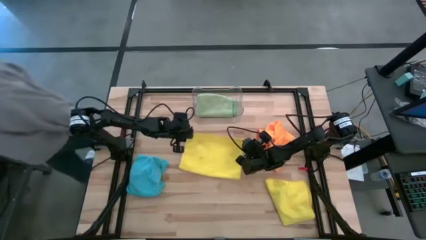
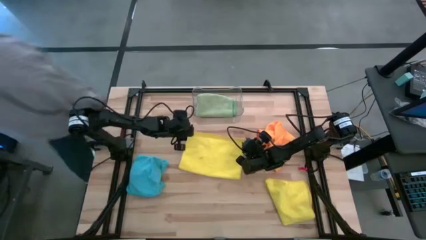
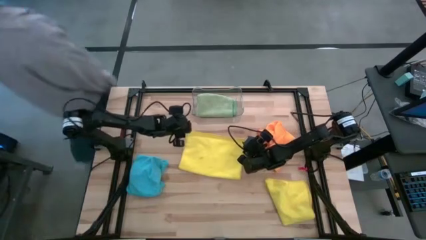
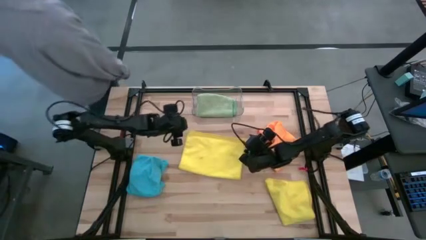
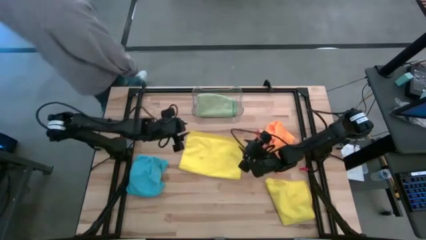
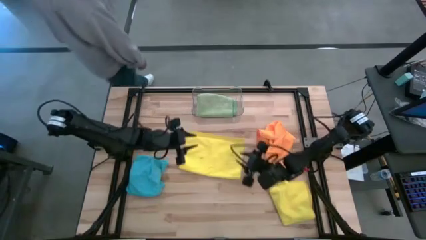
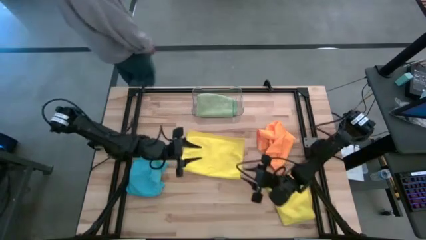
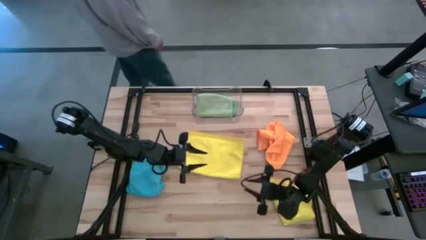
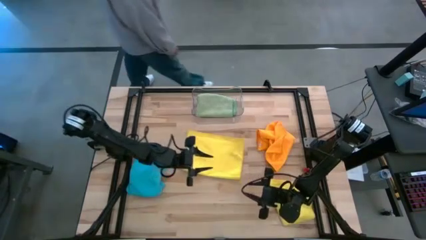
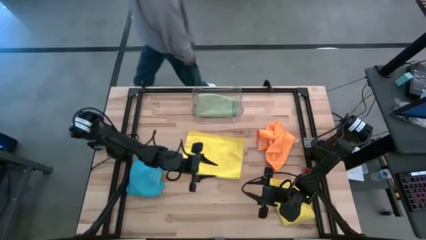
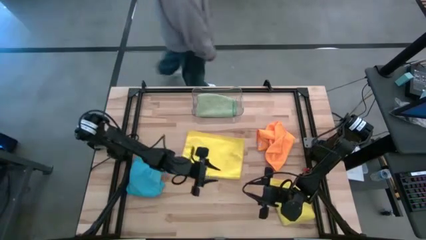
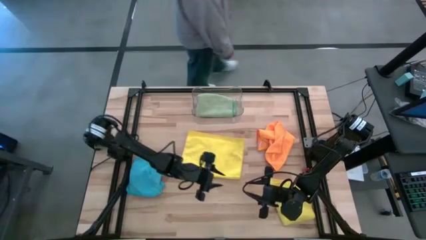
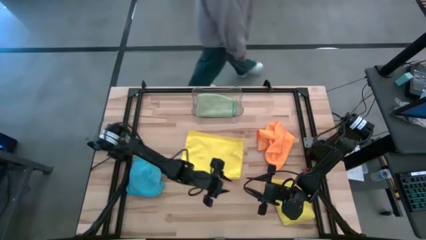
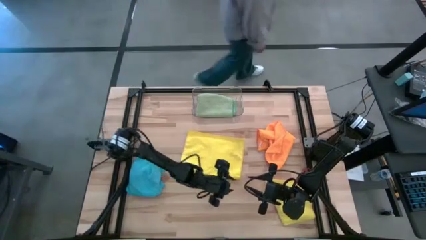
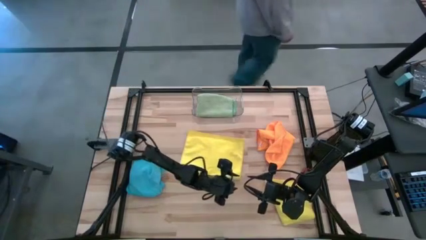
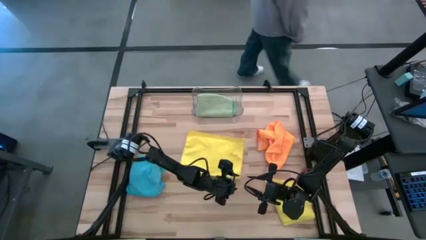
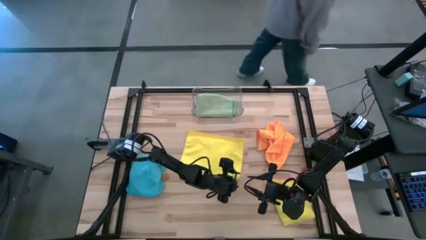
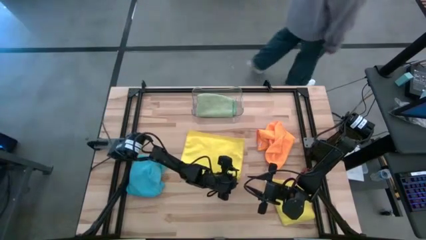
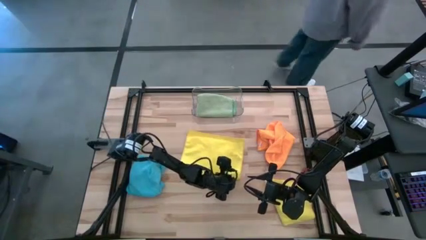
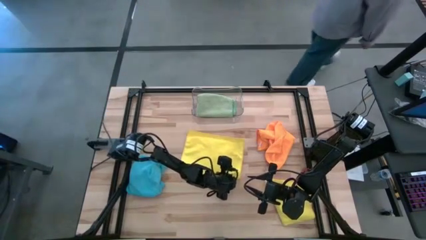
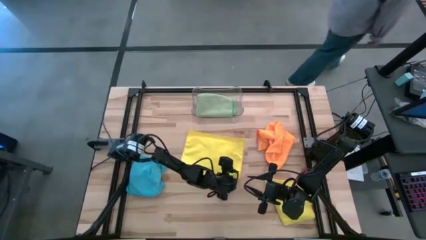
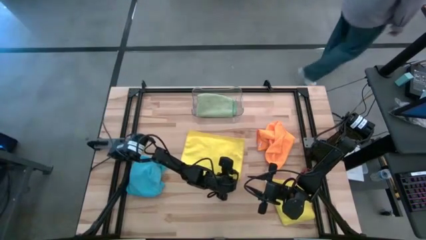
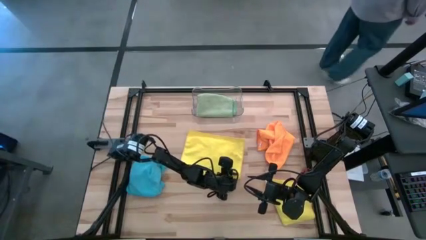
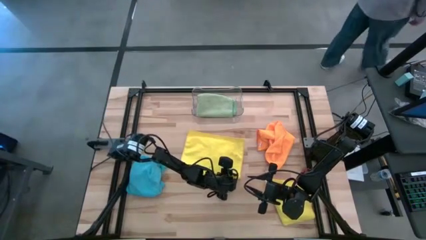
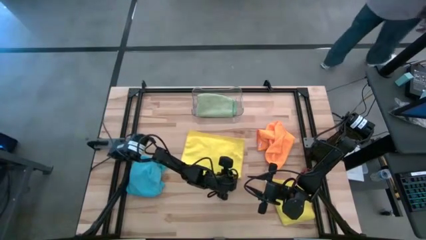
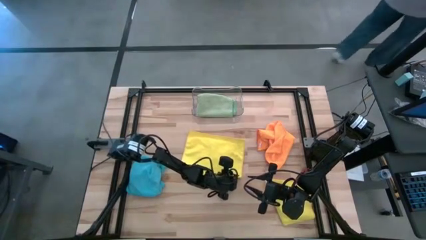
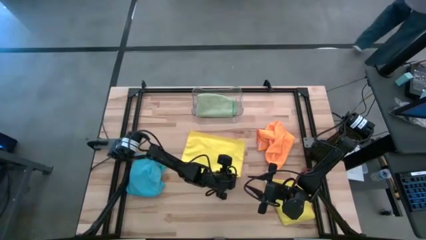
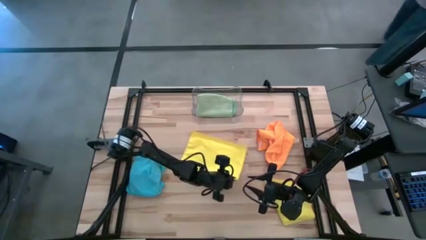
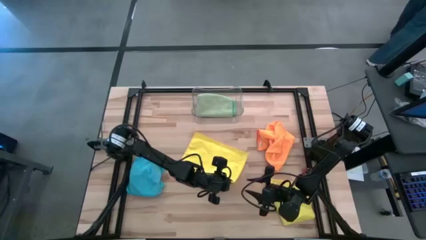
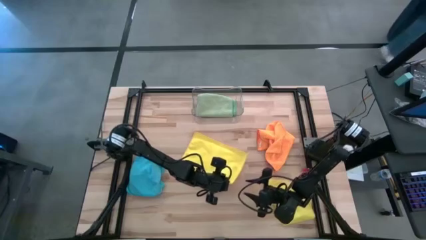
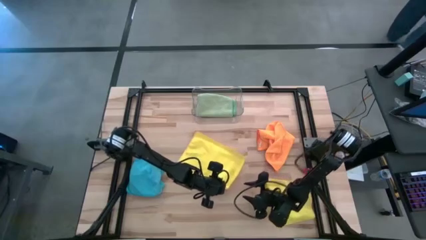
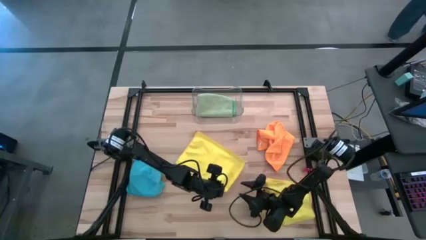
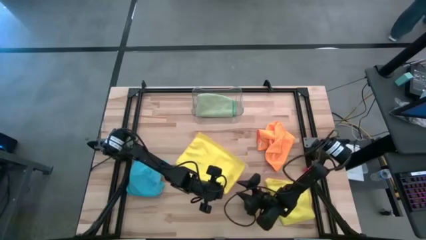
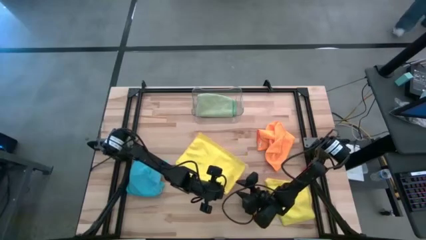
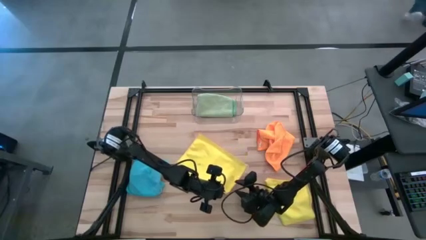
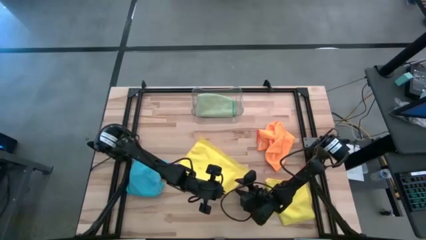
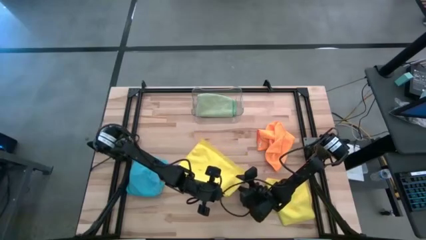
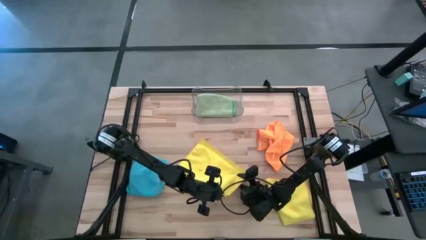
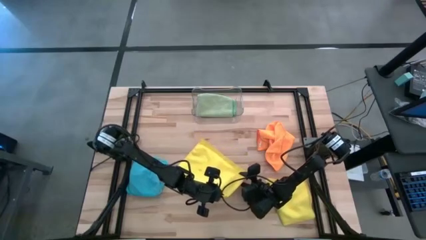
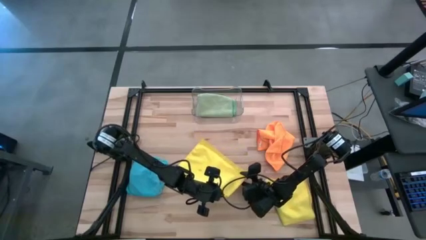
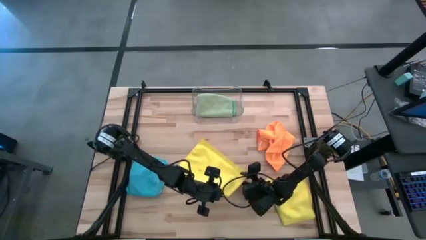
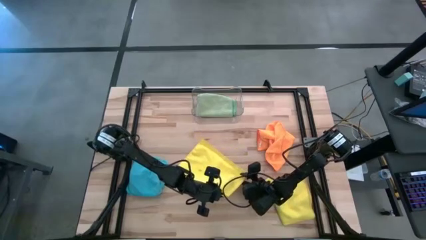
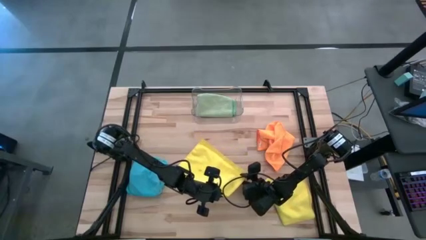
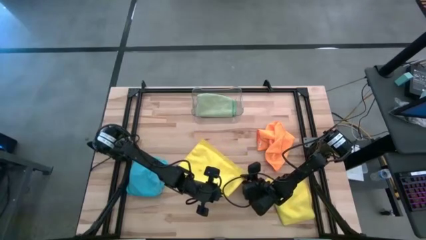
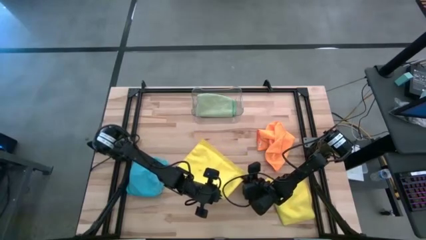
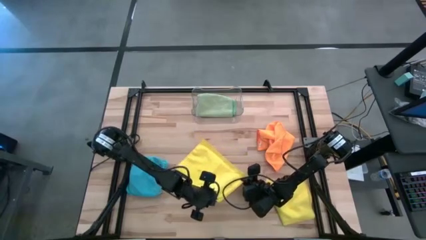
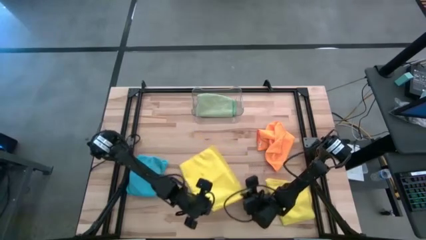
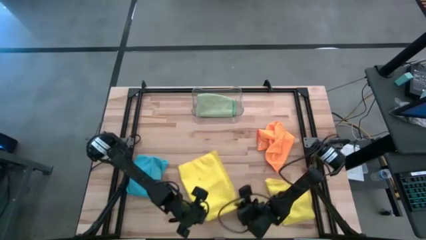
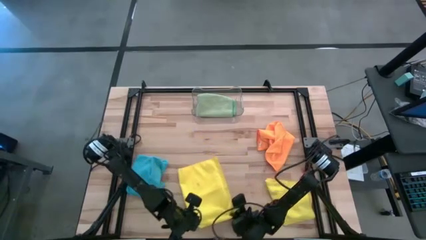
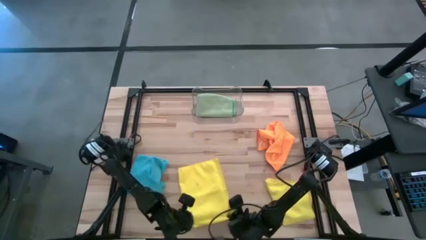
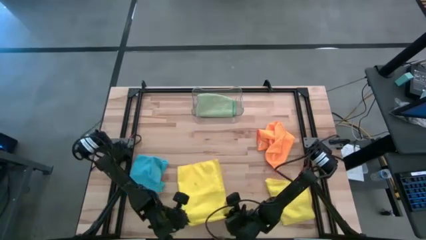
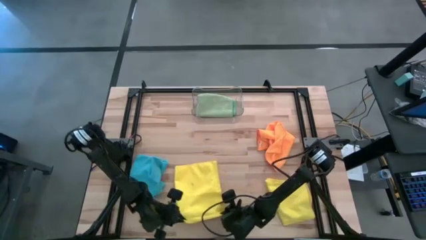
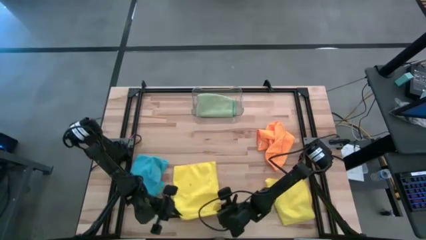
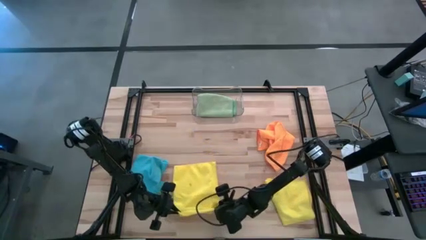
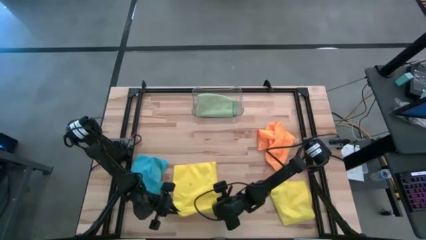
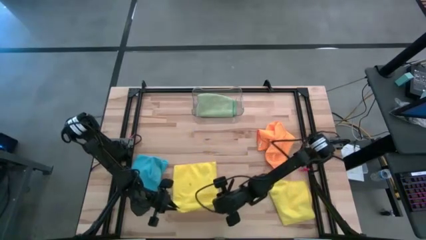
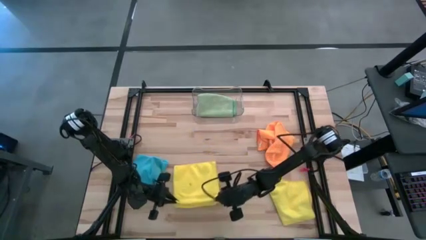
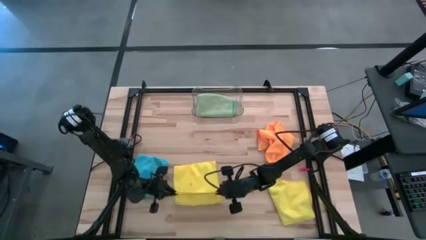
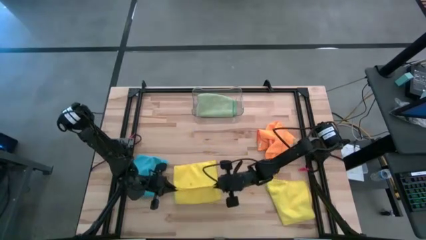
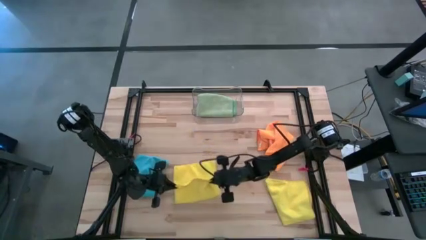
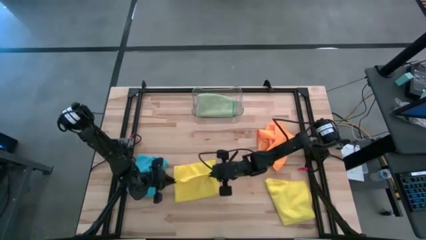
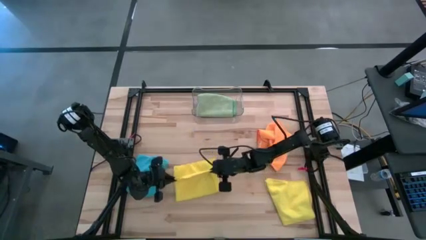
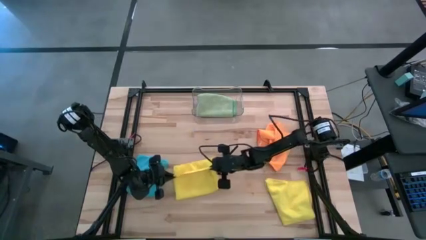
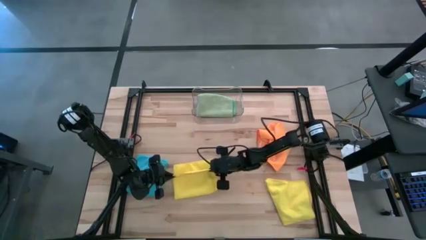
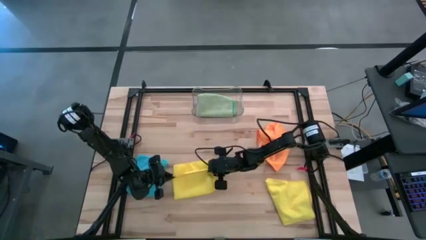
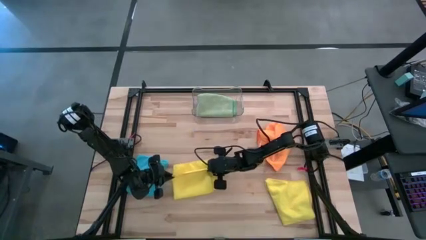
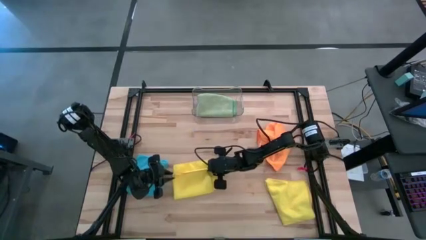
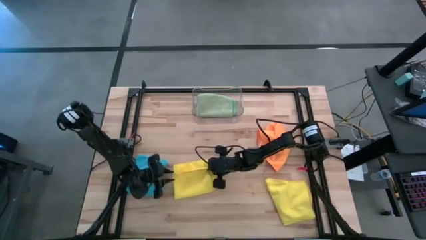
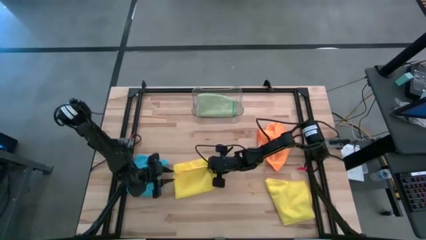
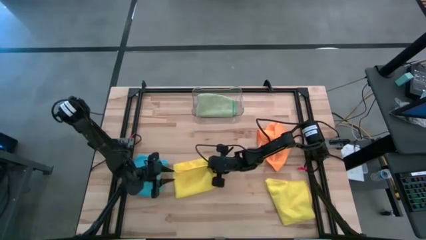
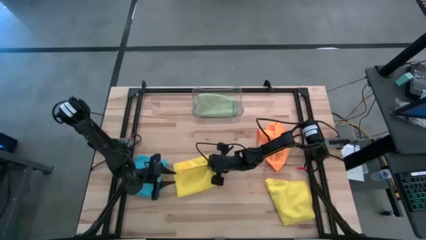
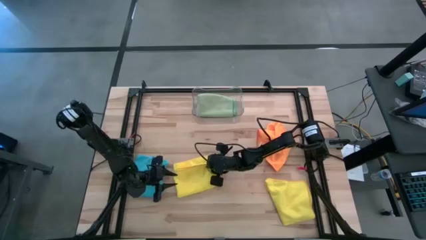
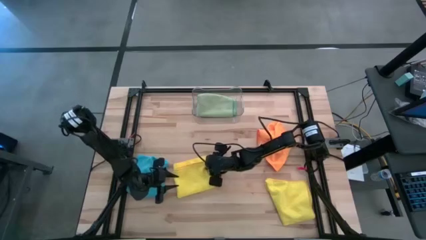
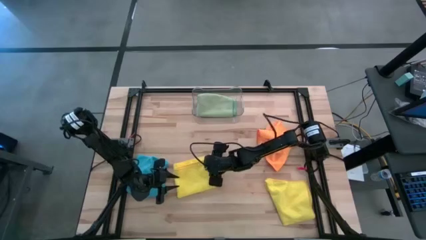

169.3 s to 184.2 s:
Task: Fold microfiber towels
Fold the top yellow microfiber cloth
